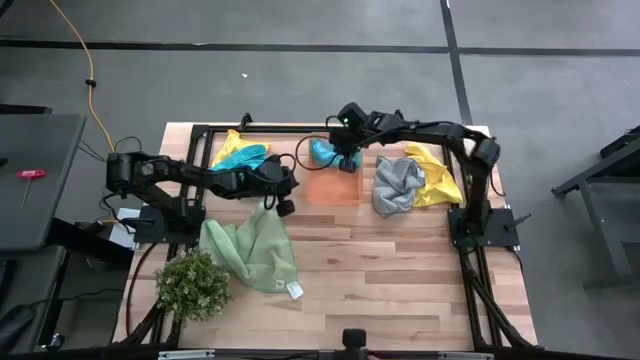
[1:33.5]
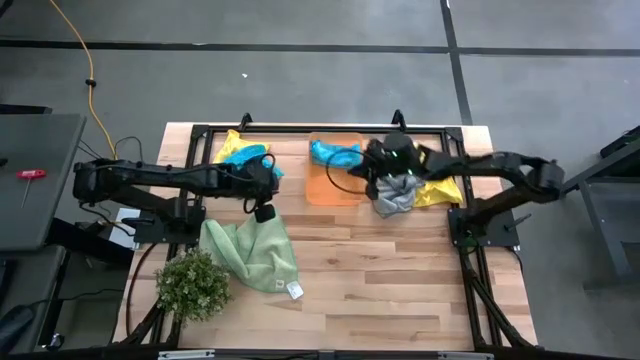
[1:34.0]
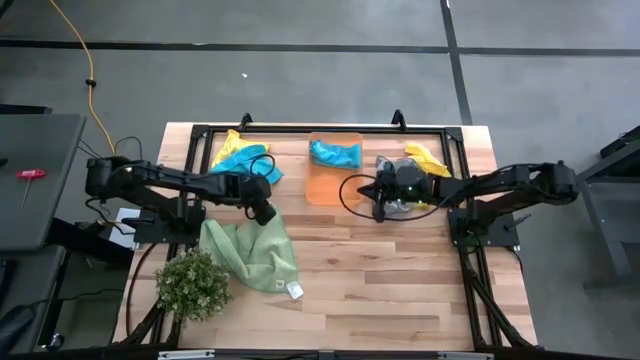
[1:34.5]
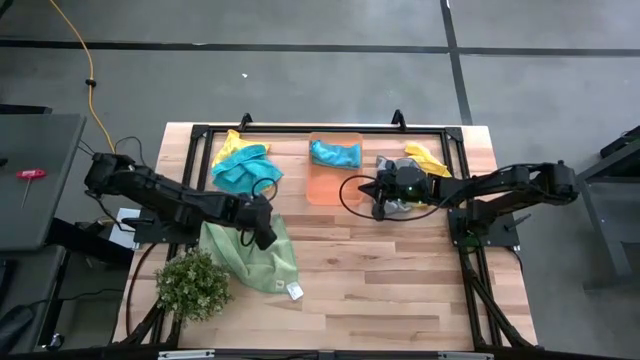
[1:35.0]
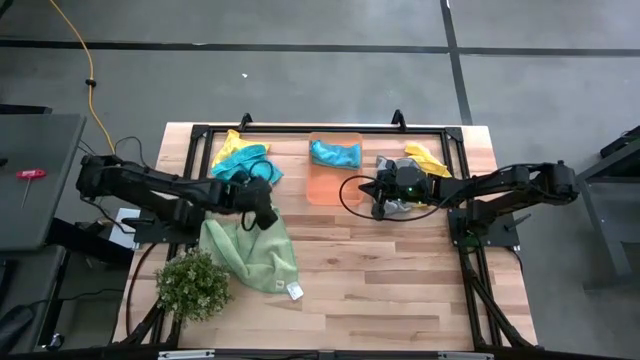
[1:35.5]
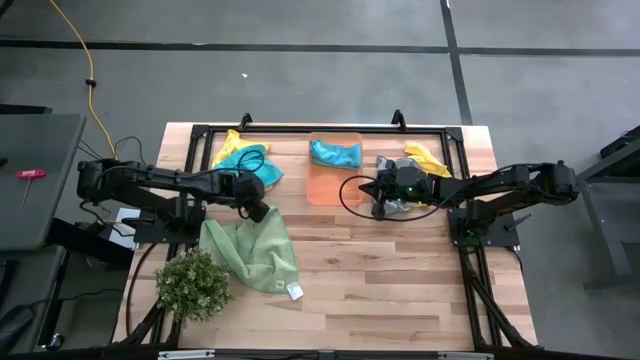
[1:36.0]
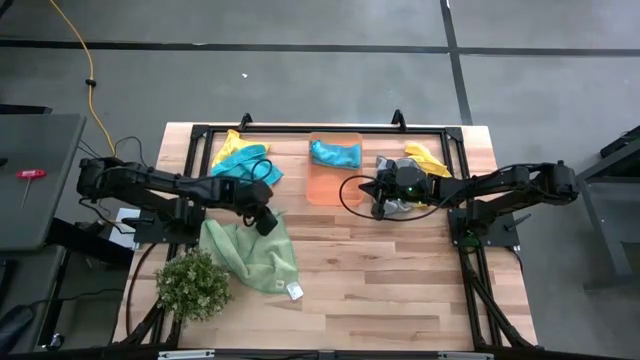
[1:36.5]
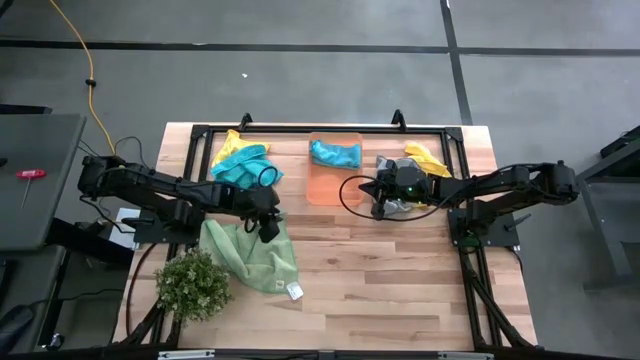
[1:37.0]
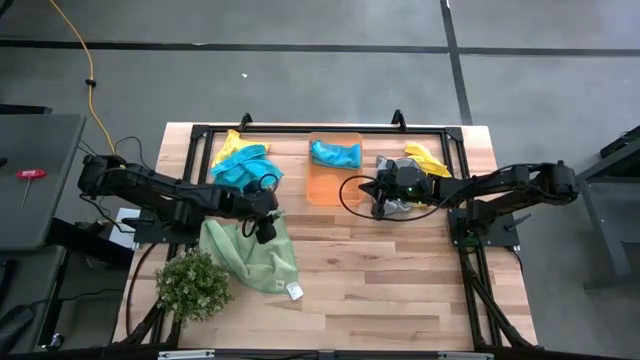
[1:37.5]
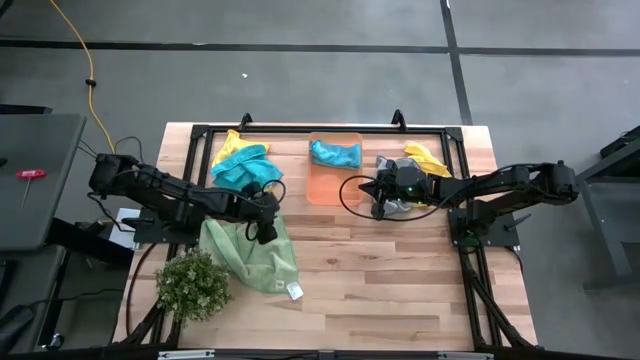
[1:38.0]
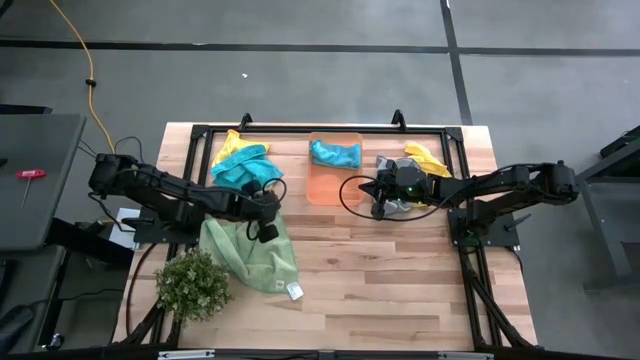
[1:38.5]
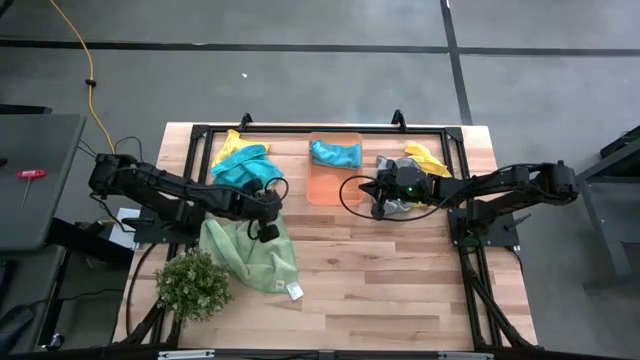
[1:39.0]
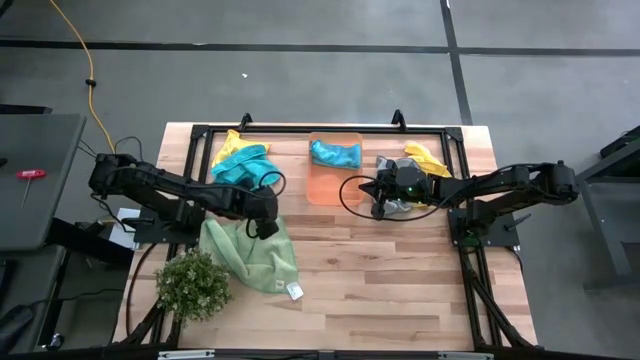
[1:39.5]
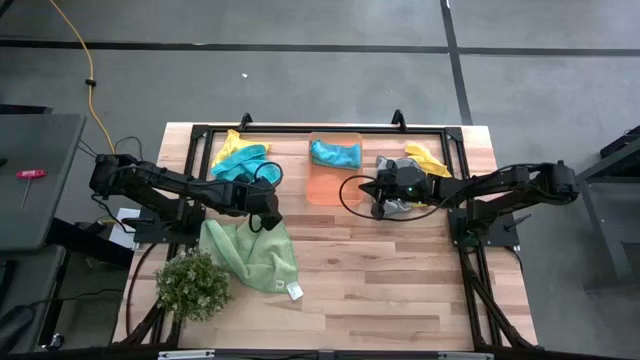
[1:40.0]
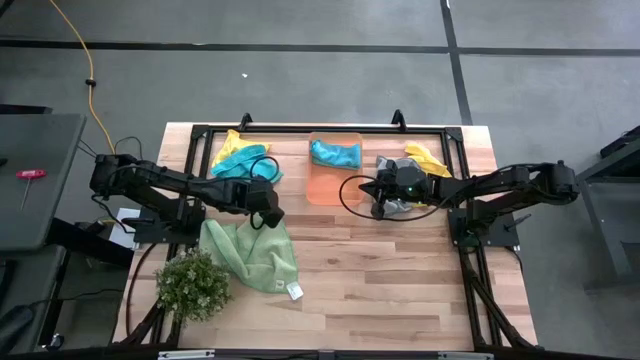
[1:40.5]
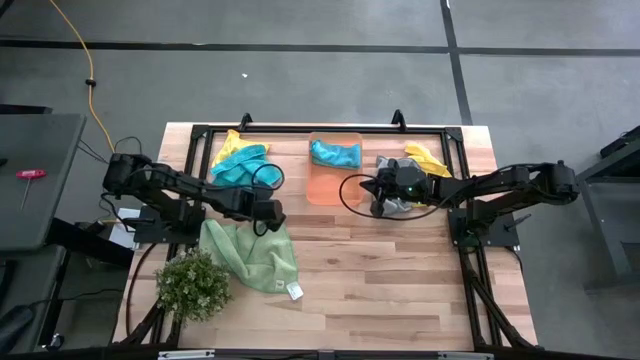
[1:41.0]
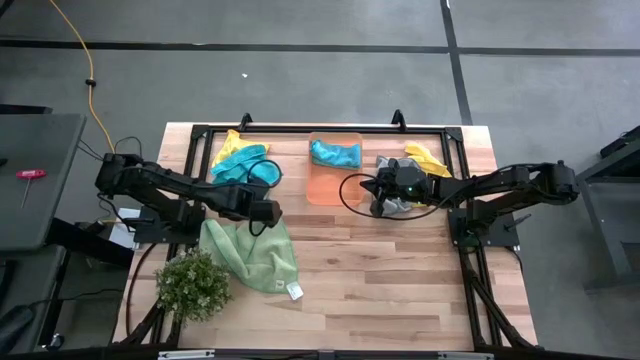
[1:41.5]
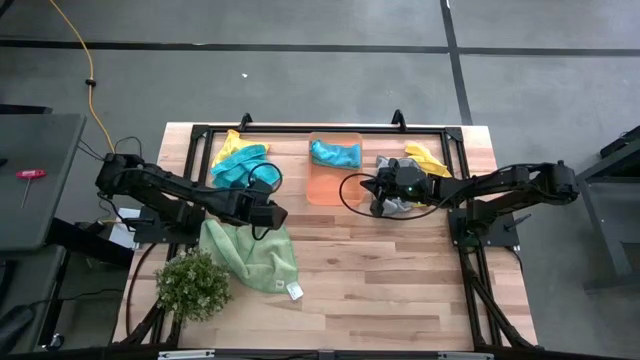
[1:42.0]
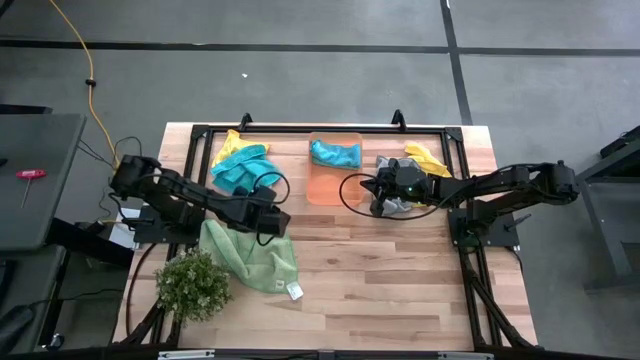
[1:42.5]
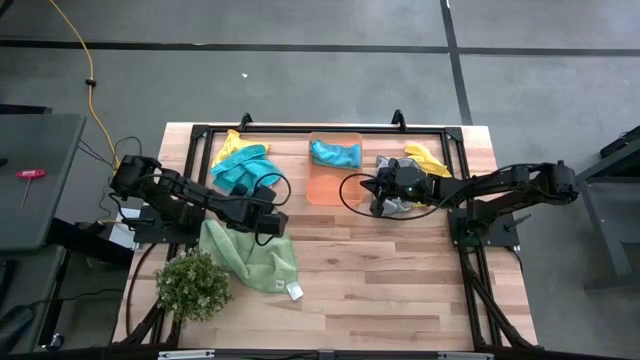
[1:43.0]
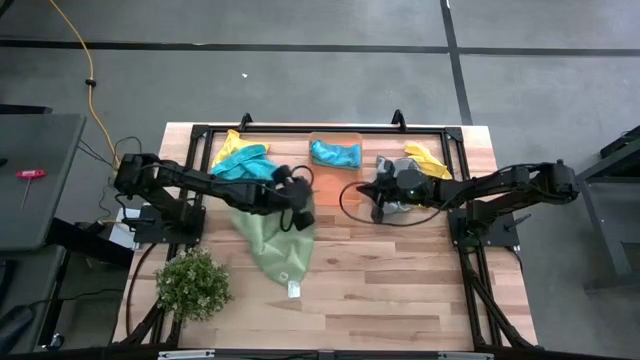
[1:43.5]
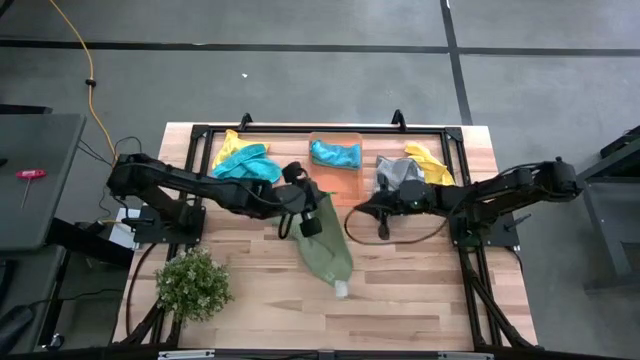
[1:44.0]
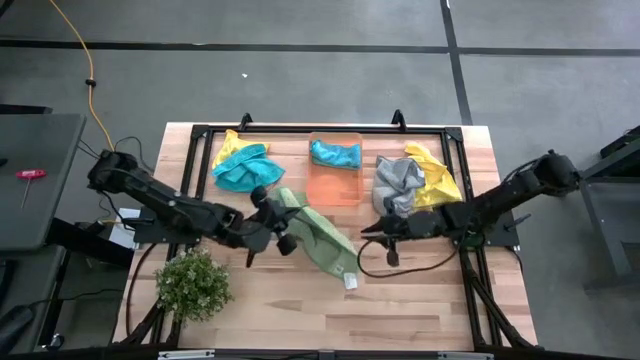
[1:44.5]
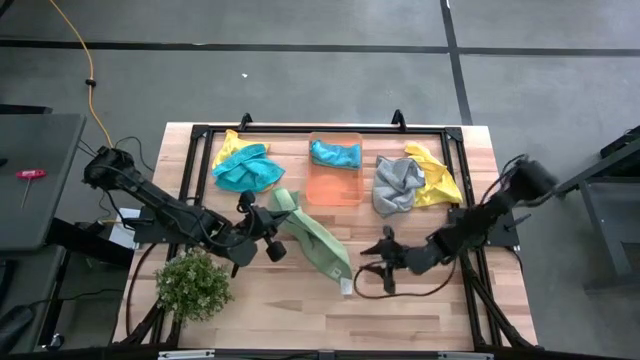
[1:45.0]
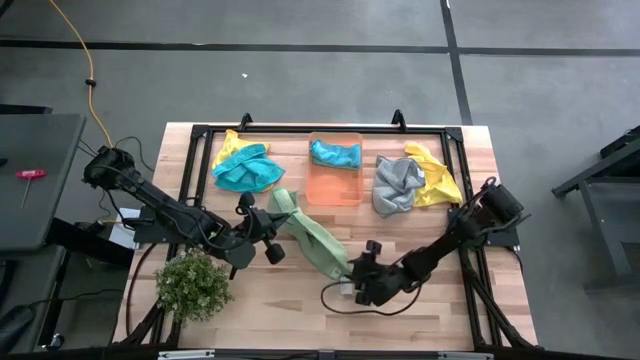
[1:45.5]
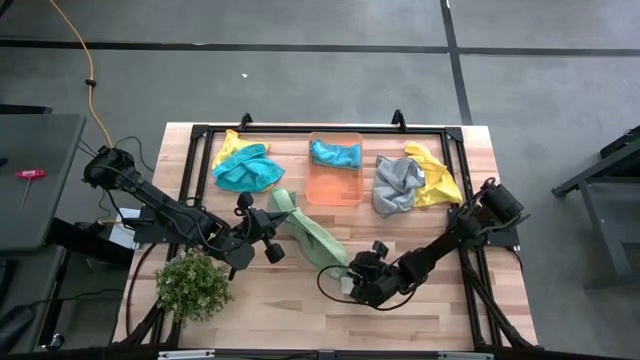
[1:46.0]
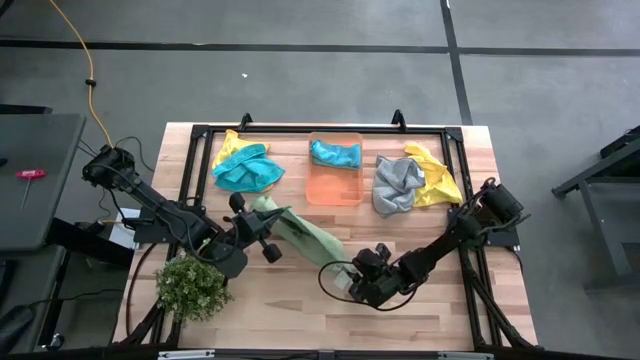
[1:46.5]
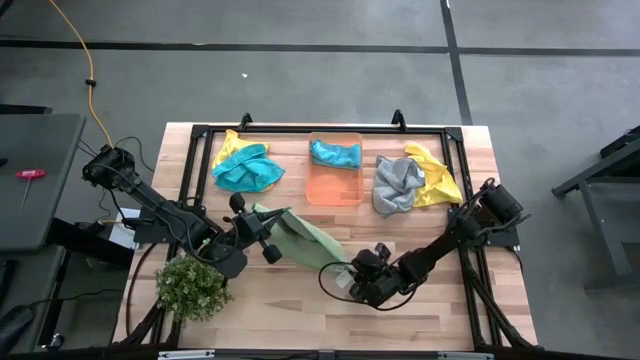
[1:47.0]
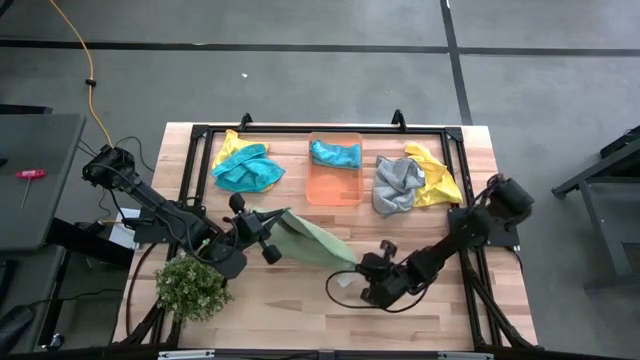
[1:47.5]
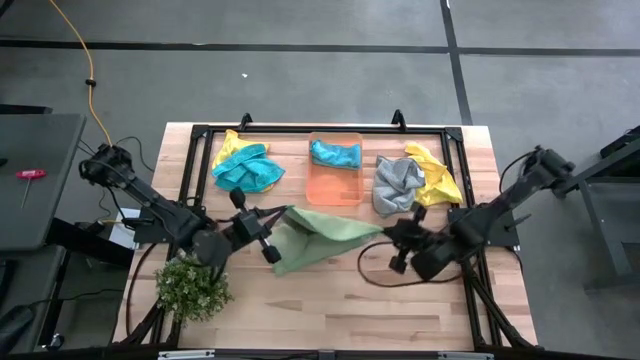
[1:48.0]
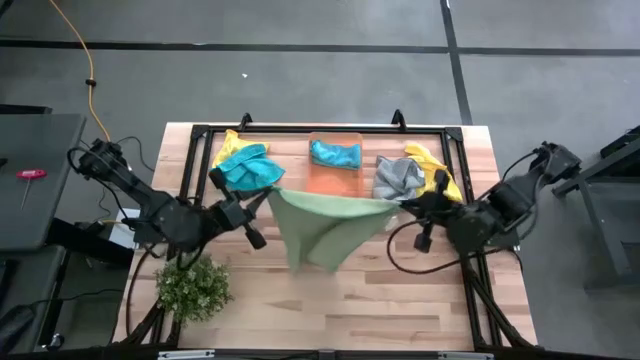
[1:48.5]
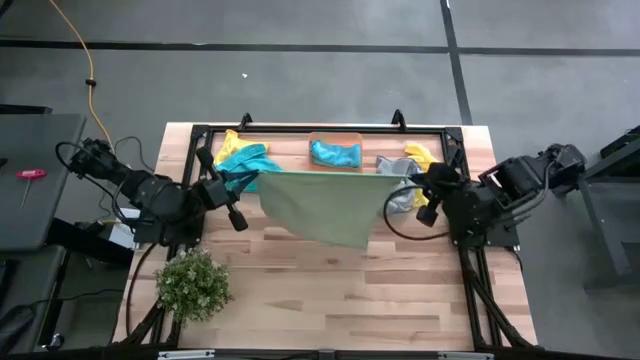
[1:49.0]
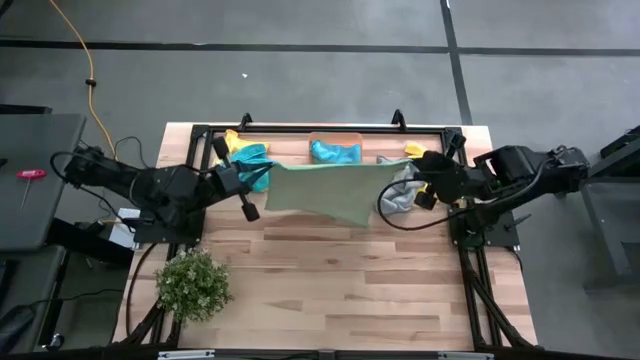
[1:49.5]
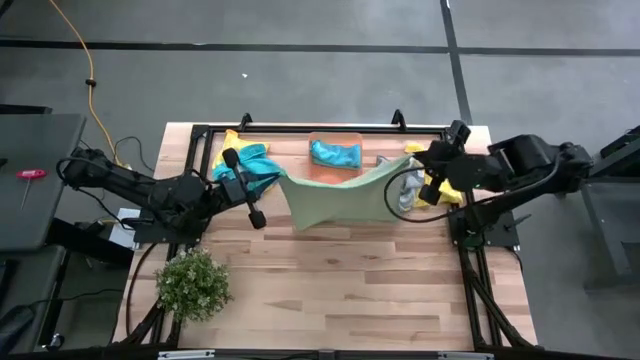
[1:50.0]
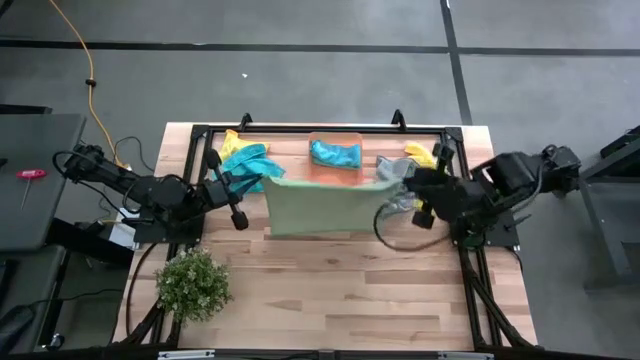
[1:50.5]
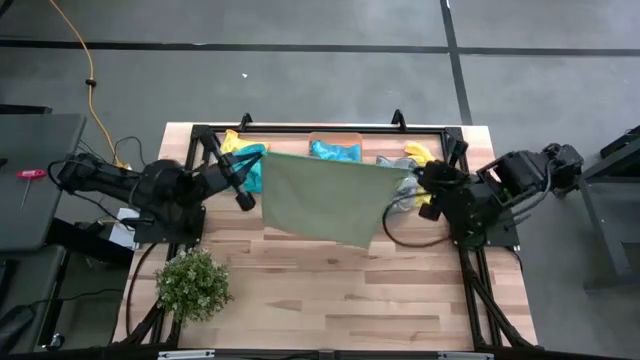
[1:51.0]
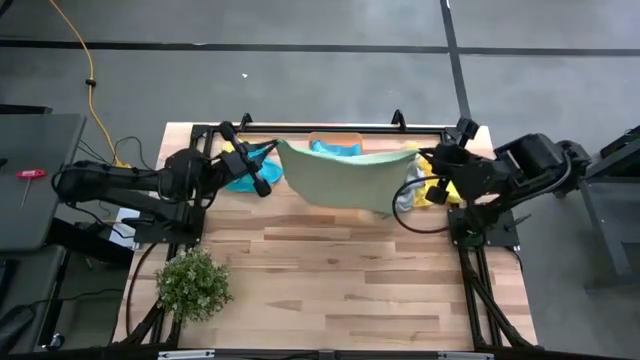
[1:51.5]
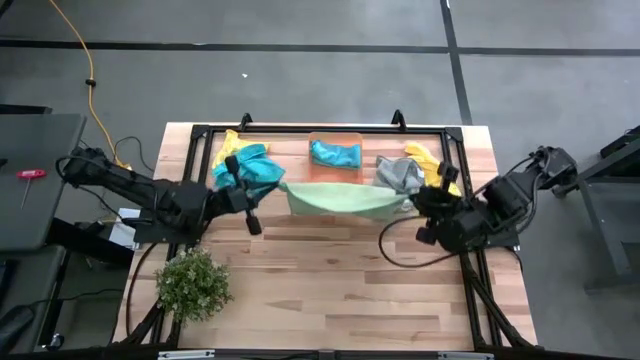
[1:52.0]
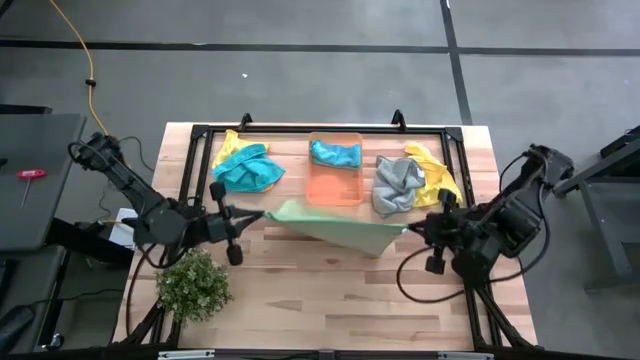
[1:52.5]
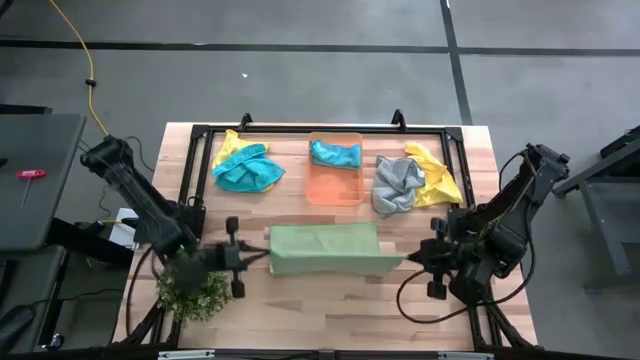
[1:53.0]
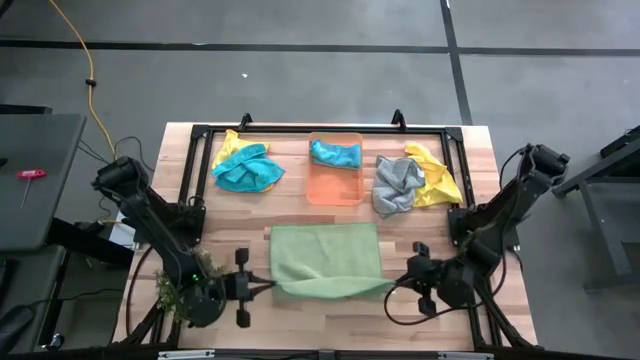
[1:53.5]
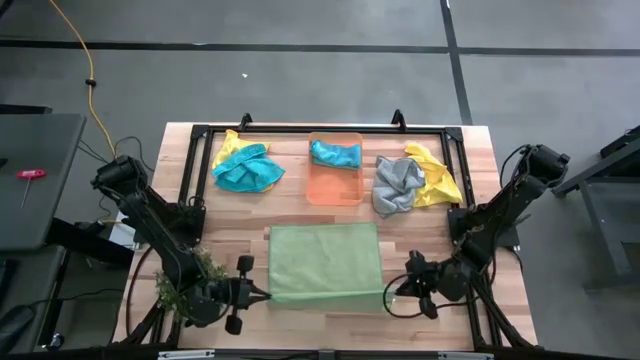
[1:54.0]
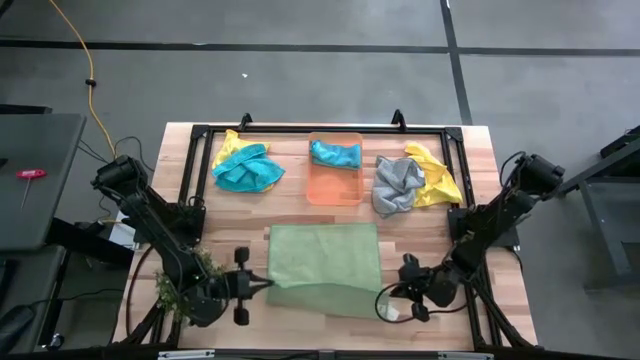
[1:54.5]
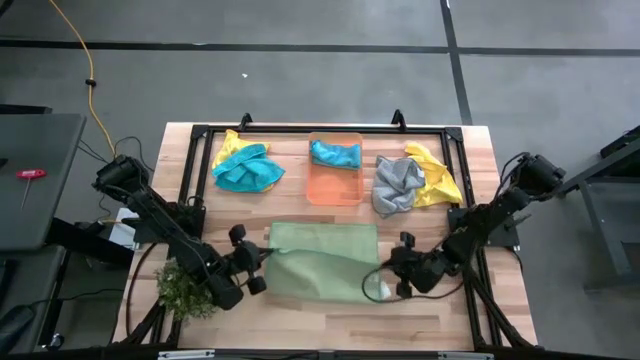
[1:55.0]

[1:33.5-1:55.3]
Task: Fold microfiber towels
Fold the green microfiber cloth
